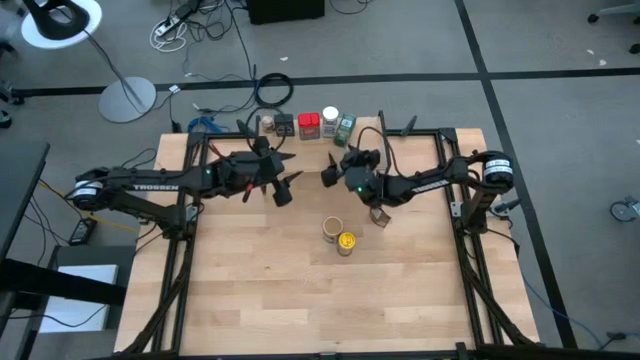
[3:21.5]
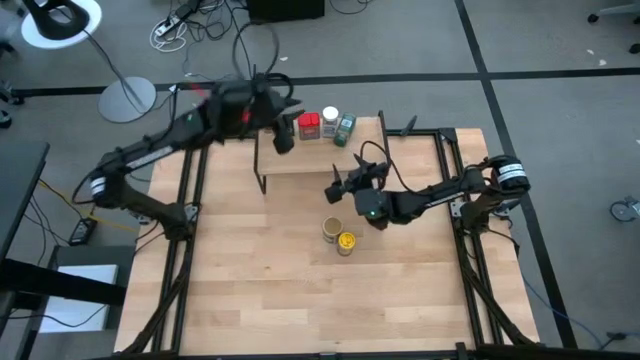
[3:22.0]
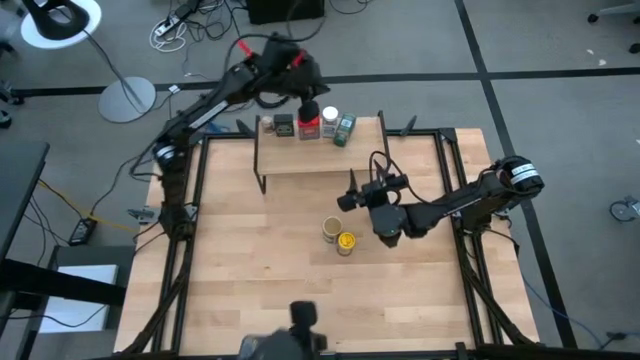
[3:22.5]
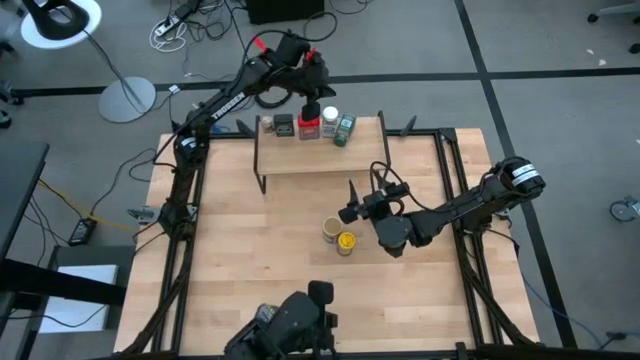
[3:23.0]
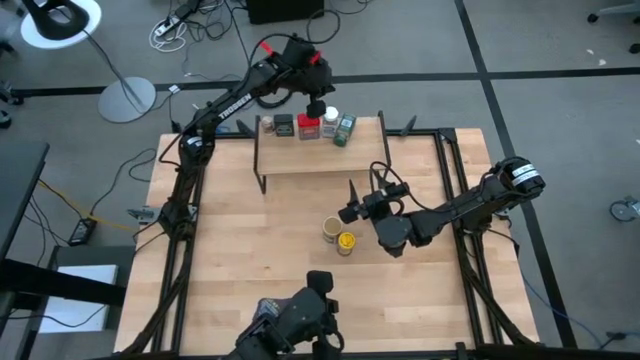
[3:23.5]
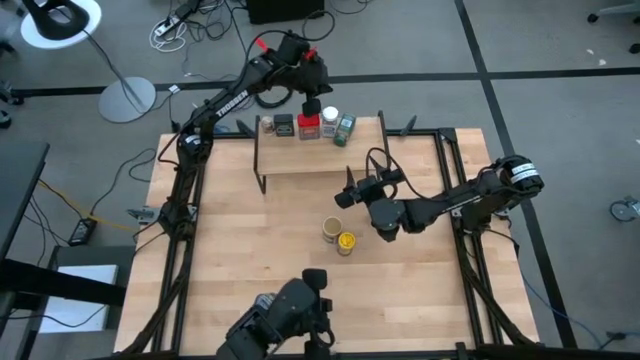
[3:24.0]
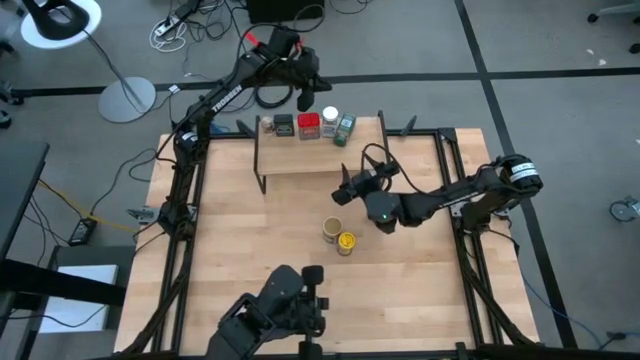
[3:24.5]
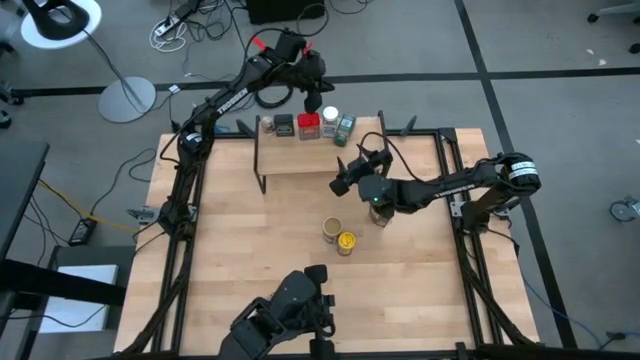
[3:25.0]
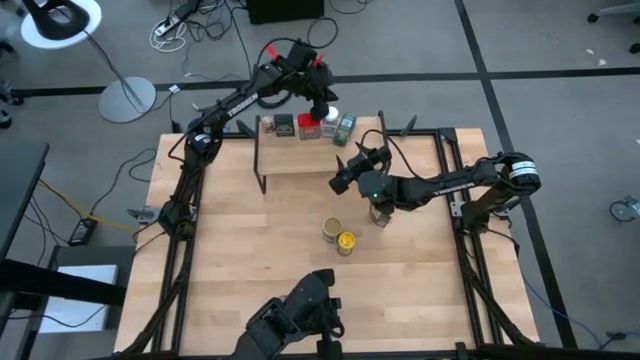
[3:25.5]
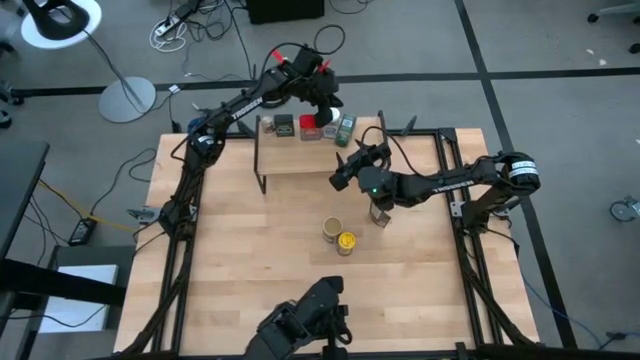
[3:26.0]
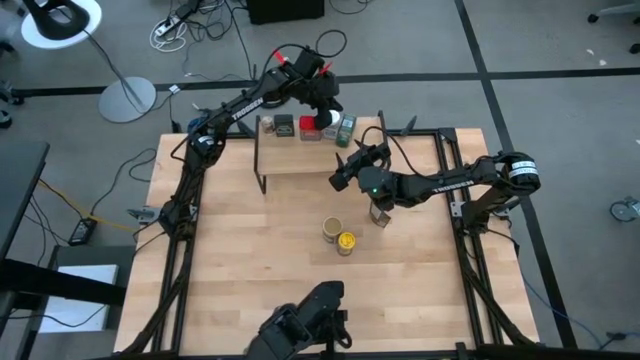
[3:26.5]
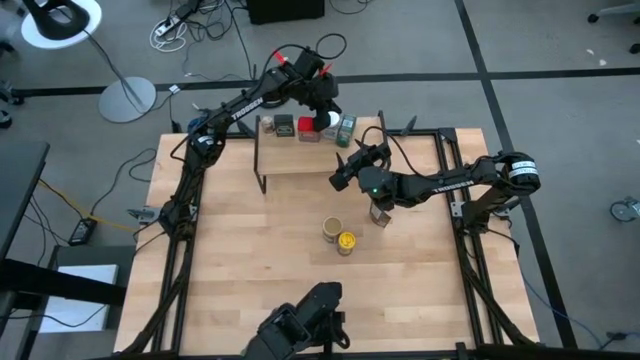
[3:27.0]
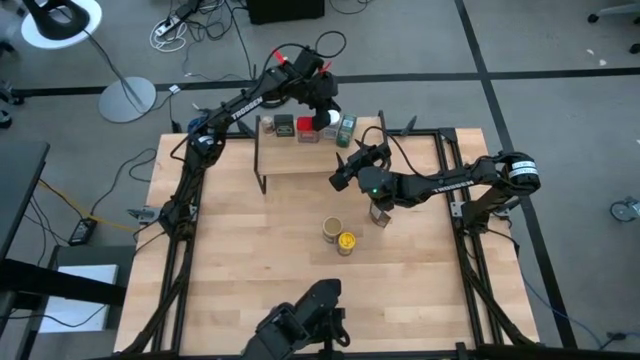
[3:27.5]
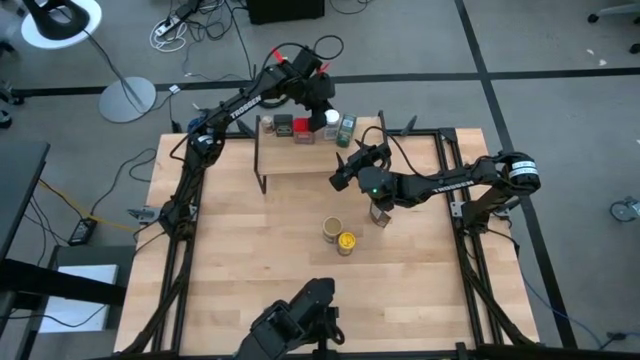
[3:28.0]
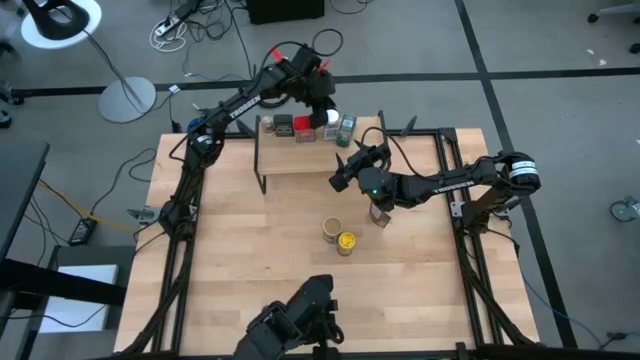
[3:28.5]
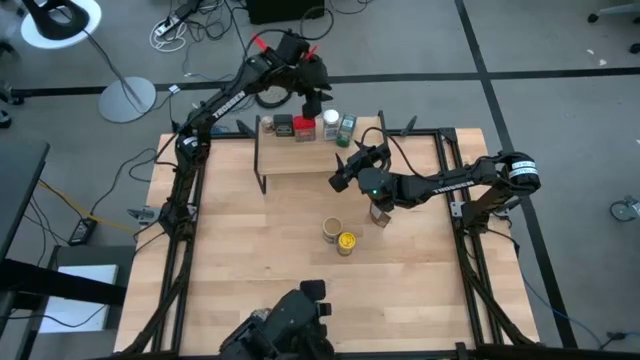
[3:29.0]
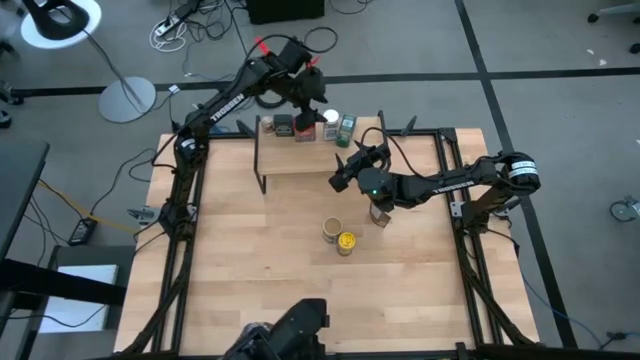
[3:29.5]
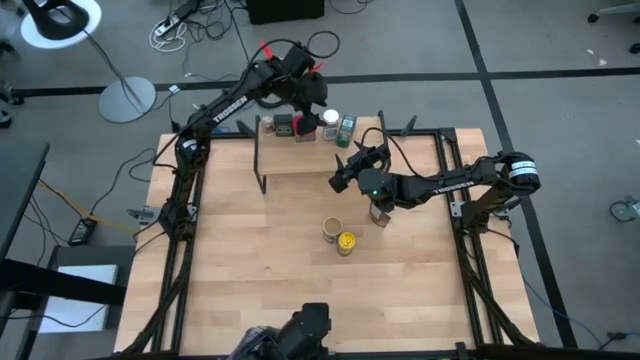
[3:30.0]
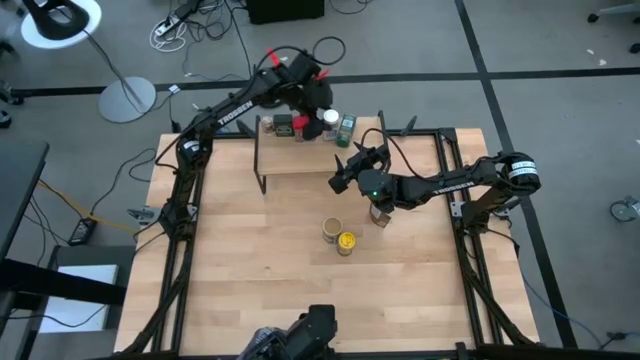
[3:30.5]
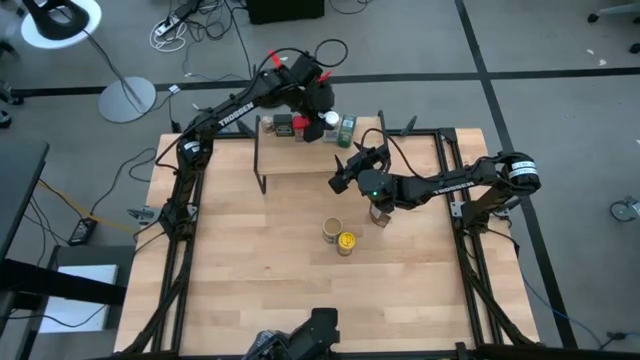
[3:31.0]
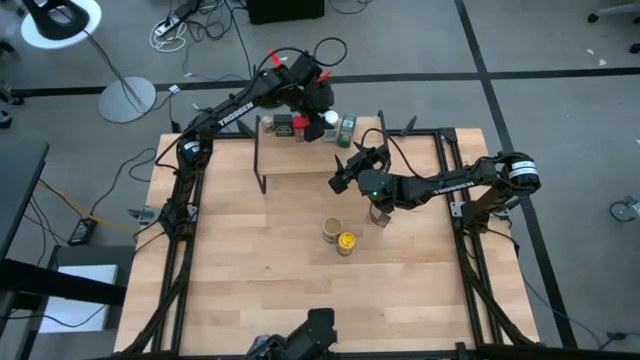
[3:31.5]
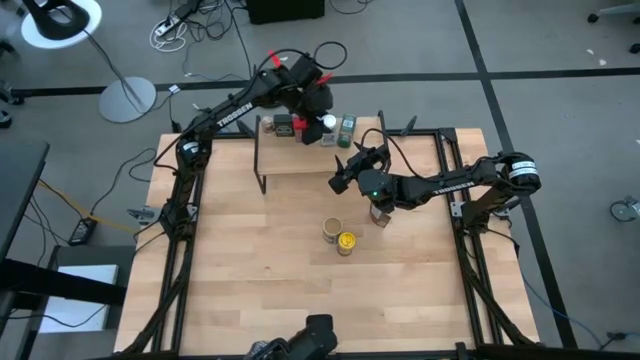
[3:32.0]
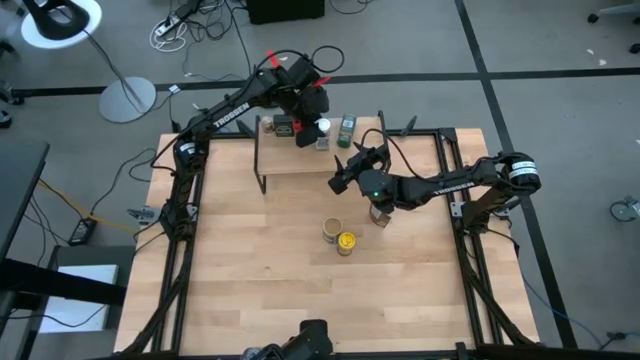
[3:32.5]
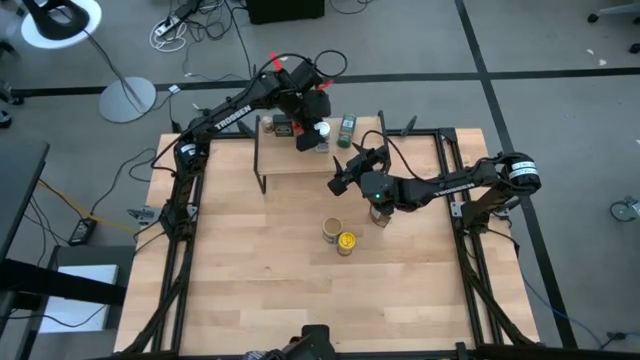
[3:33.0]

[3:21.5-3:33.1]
Task: Shelf spices
Adjust the white seasoning bottle

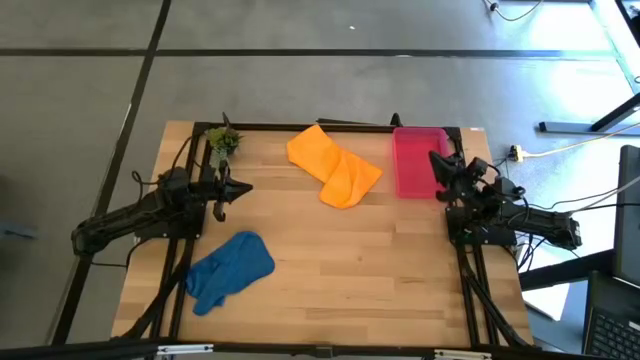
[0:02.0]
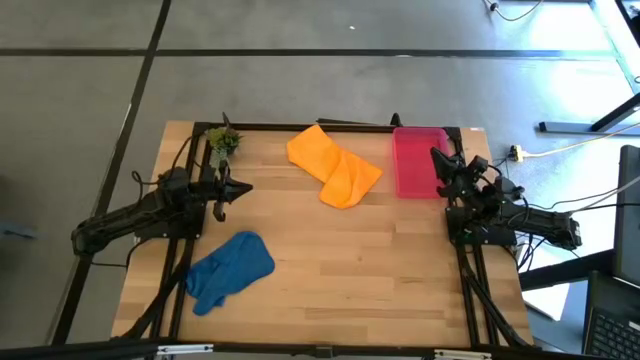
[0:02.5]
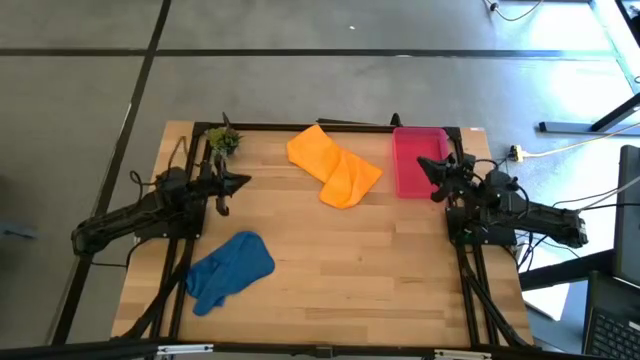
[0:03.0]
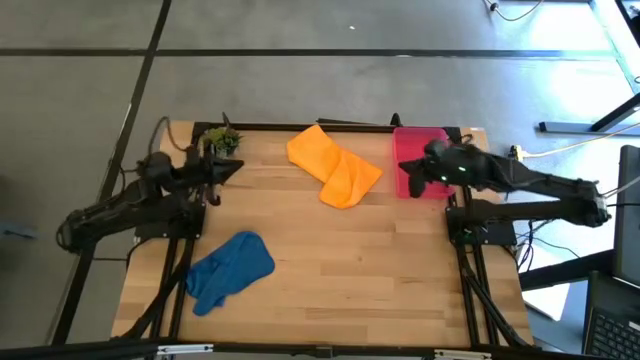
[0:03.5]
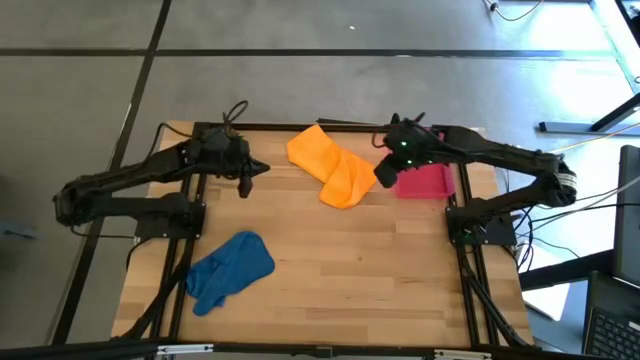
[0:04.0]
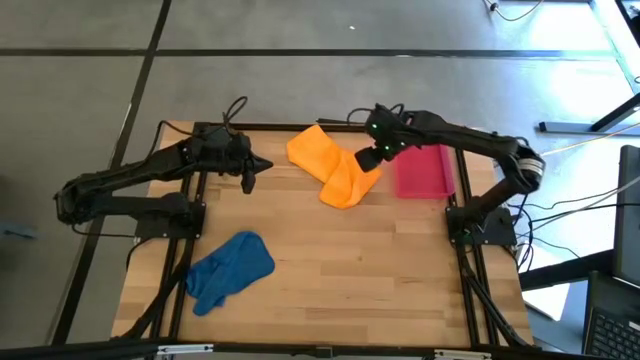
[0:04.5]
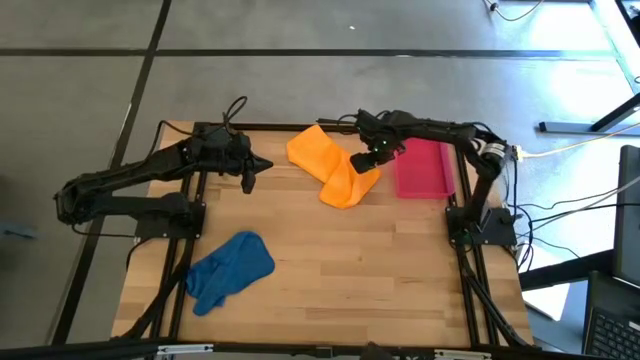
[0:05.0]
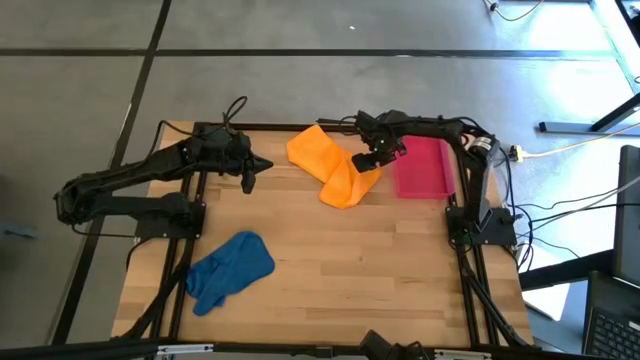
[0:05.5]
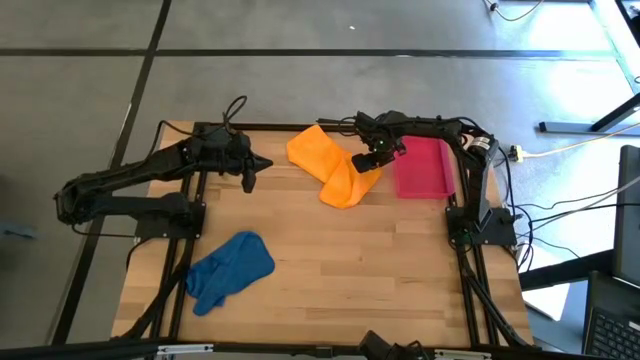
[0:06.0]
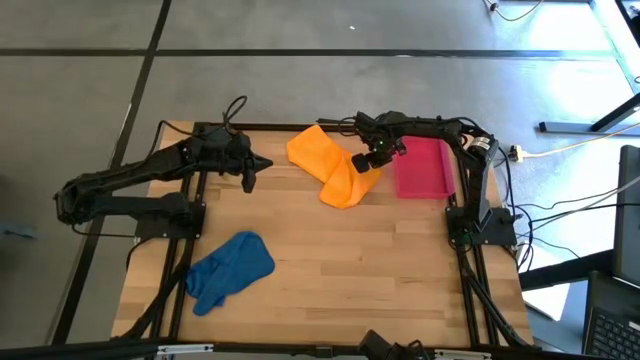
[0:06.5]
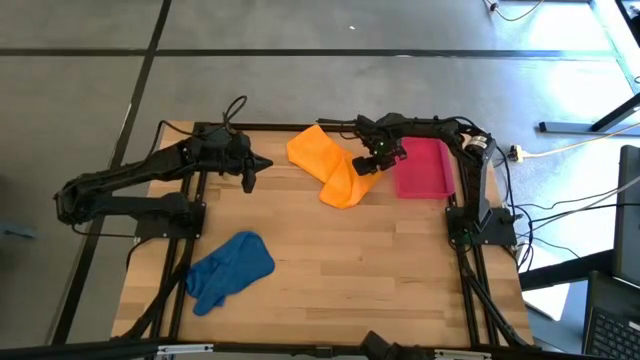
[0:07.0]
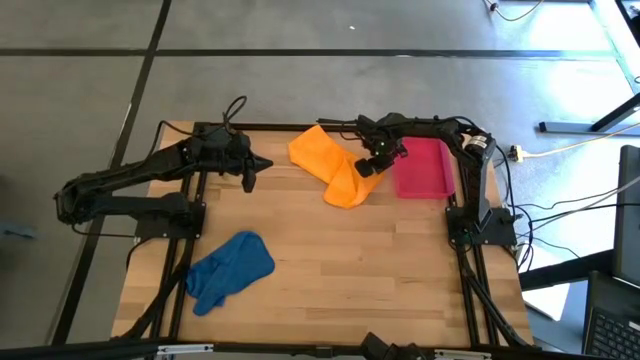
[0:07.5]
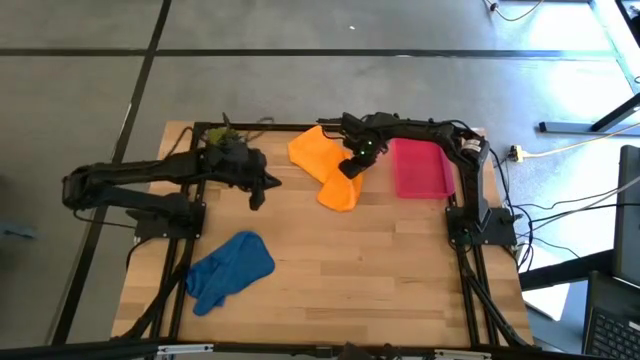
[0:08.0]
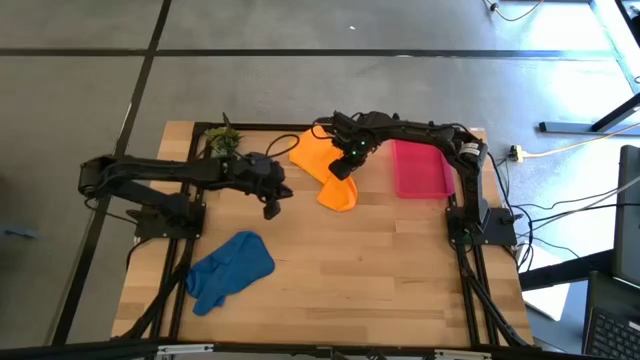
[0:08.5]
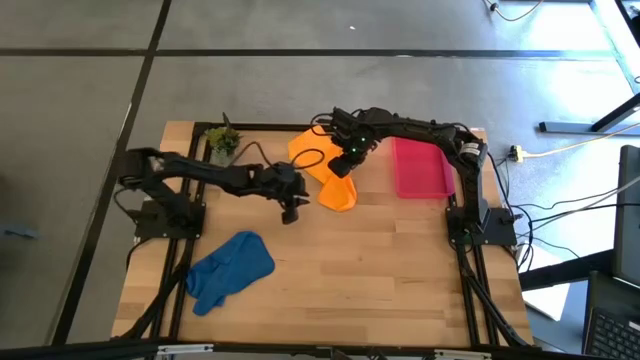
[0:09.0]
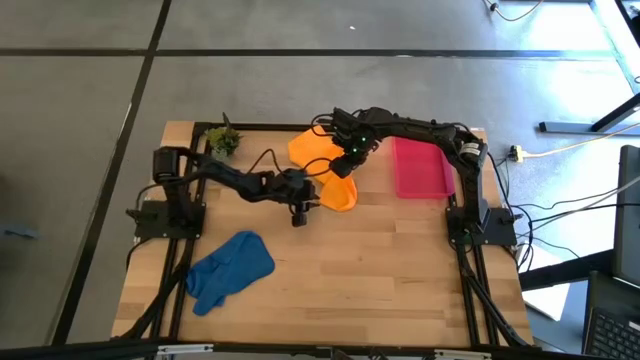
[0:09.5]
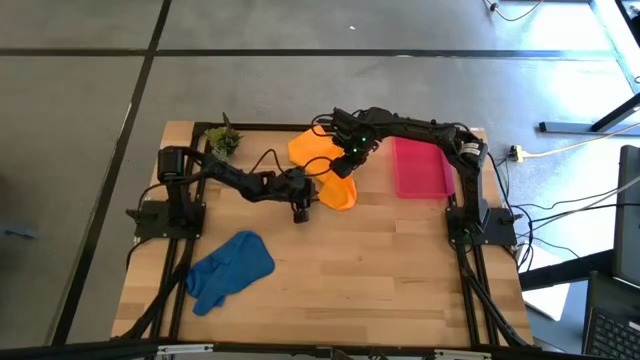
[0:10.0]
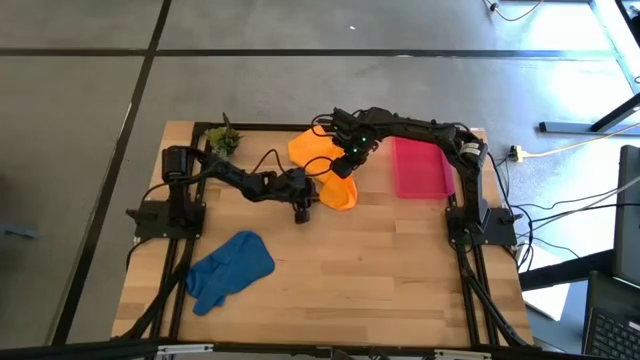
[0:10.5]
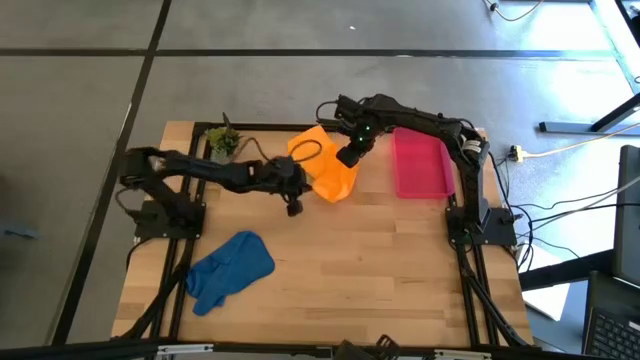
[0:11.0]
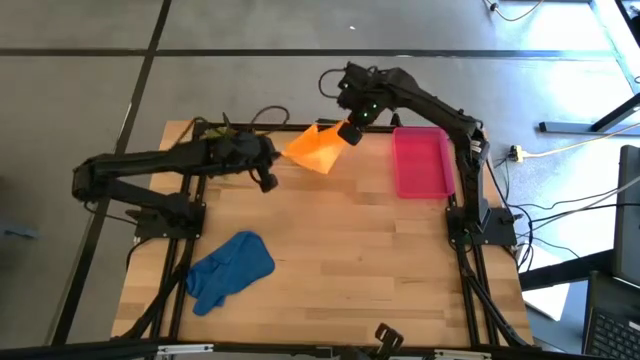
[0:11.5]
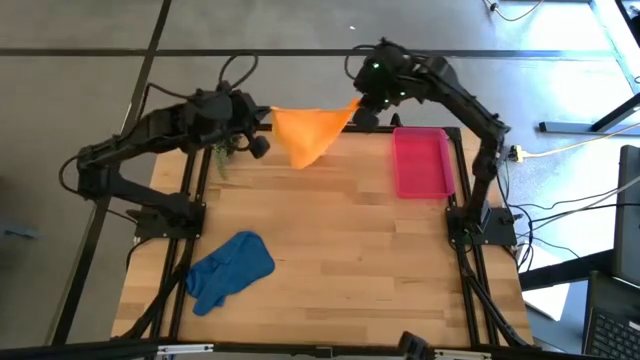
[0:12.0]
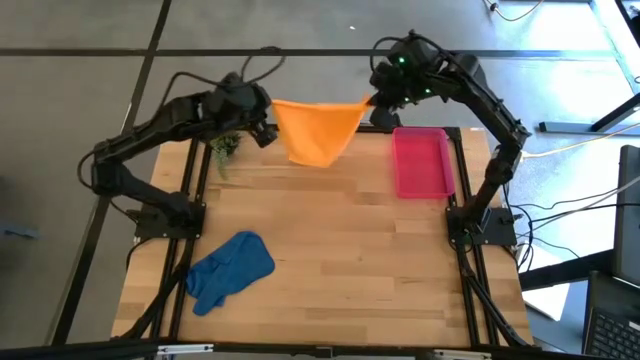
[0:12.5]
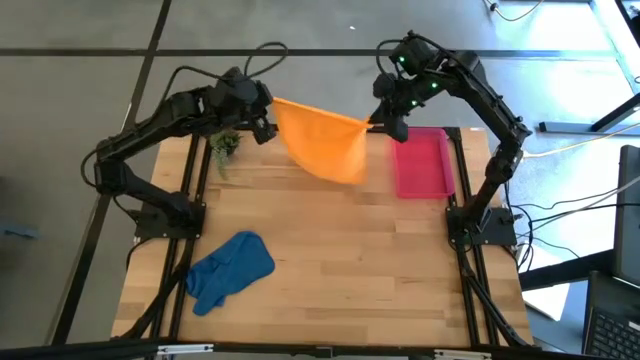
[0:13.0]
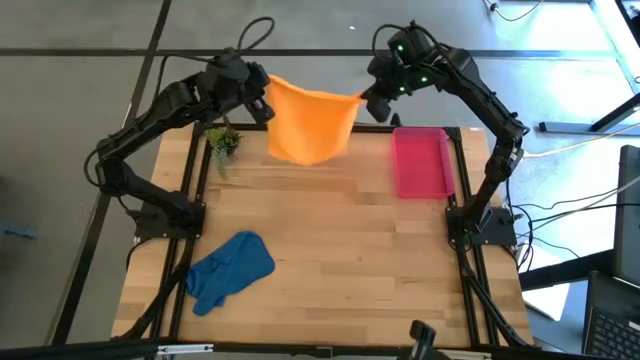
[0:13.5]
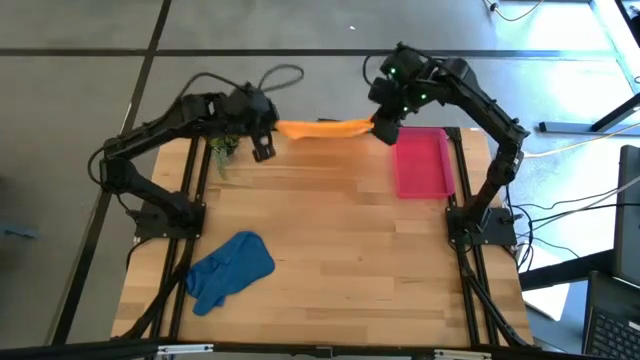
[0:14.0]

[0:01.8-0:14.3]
Task: Roll microfiber towels into tight, uniform cylinder then place into a basket
Fold the orange microfiber towel
